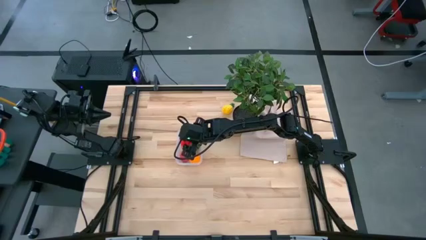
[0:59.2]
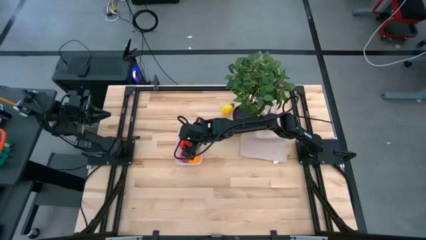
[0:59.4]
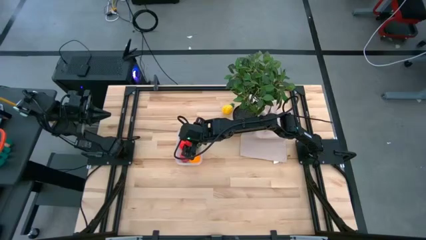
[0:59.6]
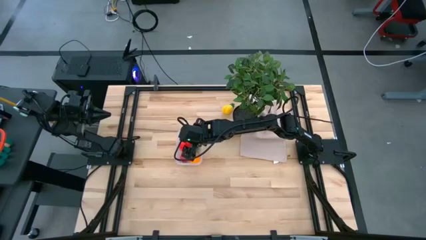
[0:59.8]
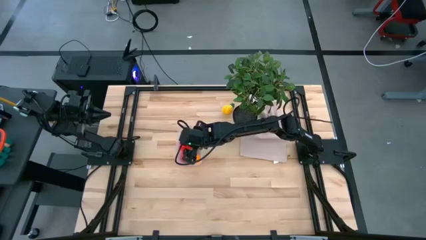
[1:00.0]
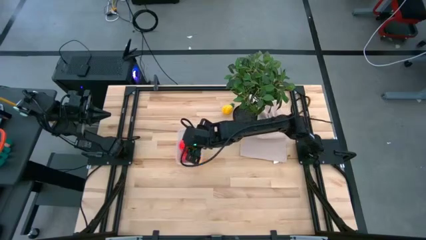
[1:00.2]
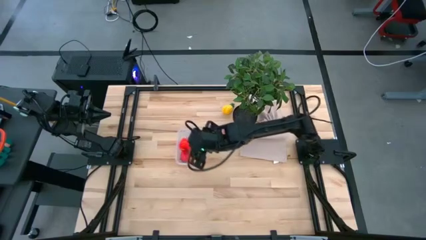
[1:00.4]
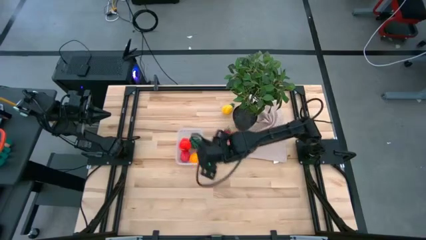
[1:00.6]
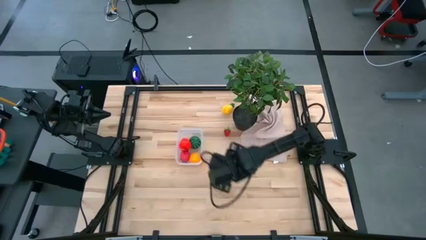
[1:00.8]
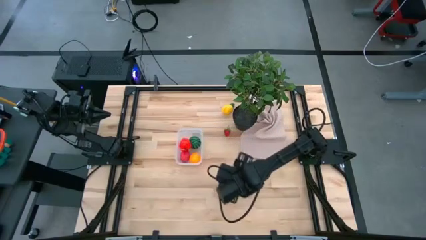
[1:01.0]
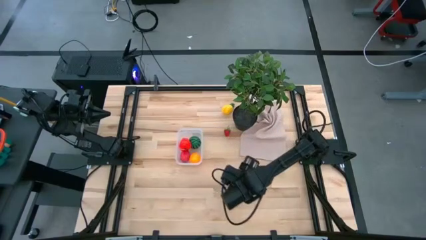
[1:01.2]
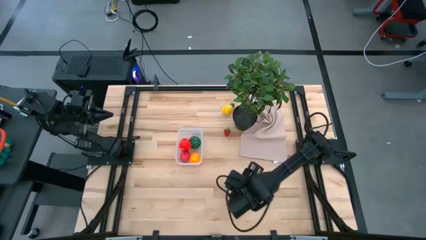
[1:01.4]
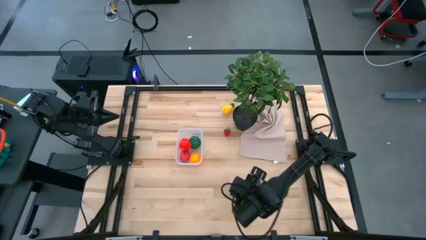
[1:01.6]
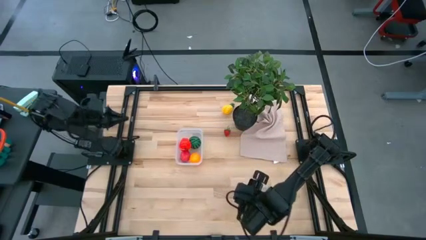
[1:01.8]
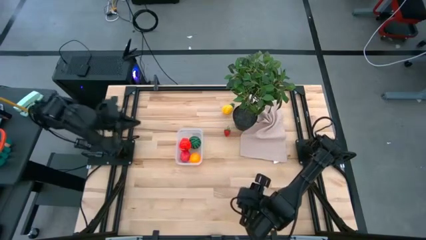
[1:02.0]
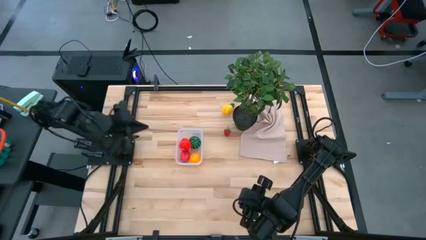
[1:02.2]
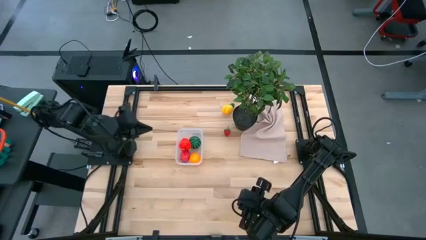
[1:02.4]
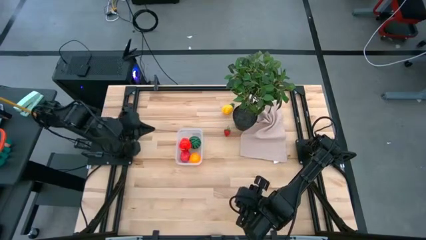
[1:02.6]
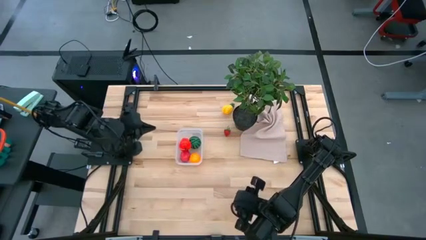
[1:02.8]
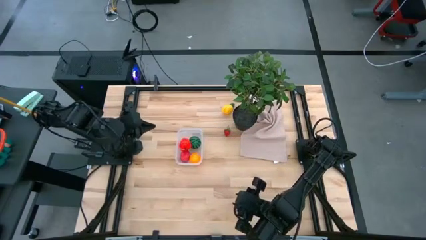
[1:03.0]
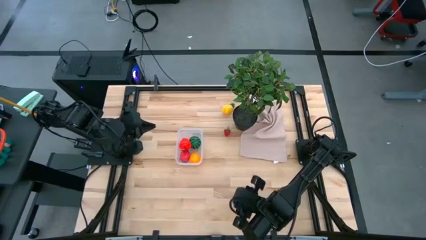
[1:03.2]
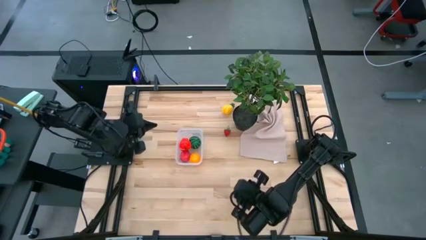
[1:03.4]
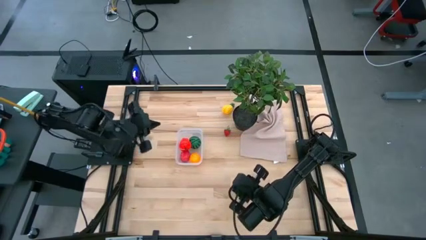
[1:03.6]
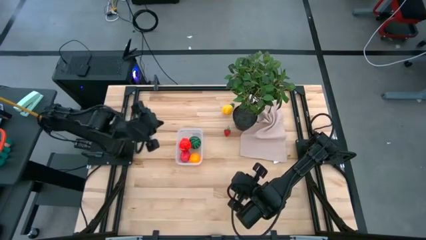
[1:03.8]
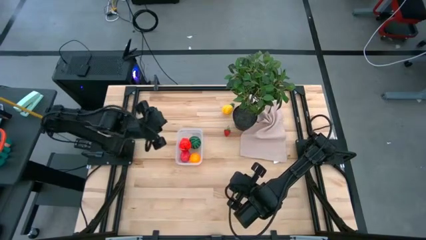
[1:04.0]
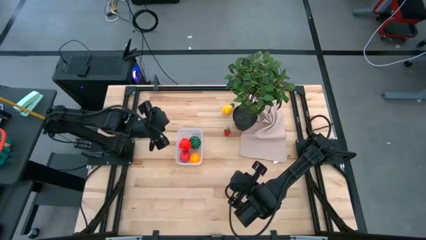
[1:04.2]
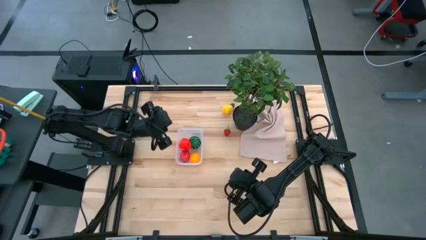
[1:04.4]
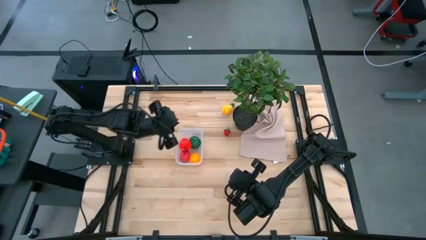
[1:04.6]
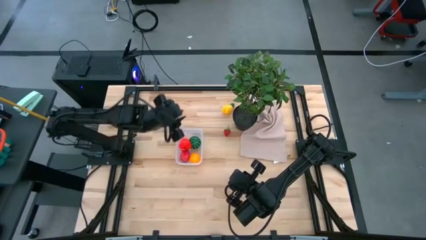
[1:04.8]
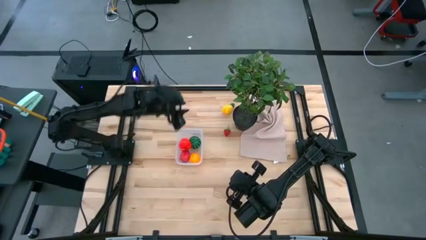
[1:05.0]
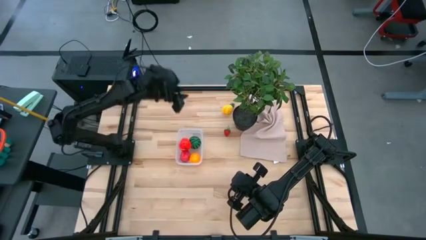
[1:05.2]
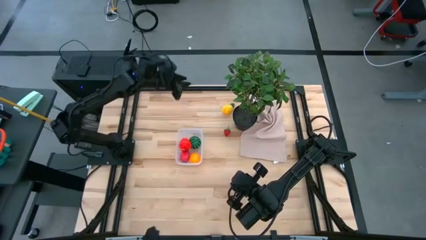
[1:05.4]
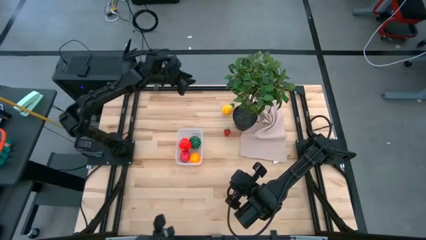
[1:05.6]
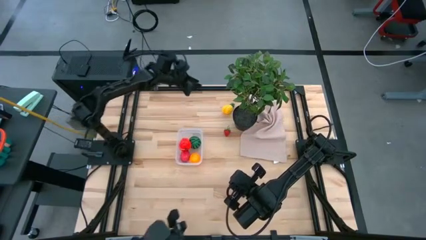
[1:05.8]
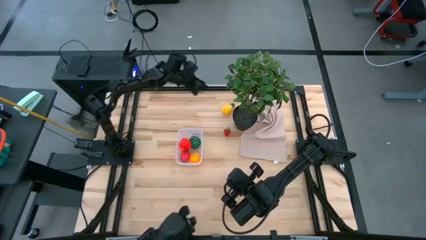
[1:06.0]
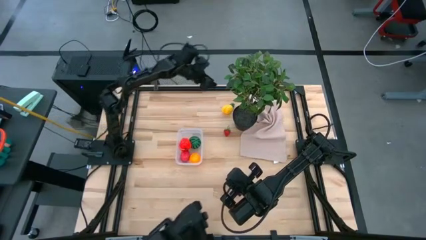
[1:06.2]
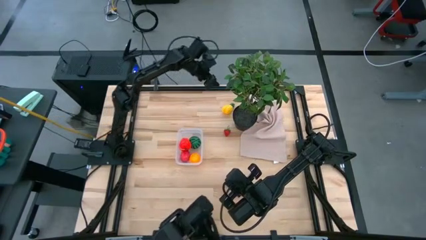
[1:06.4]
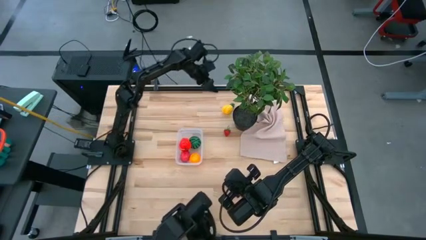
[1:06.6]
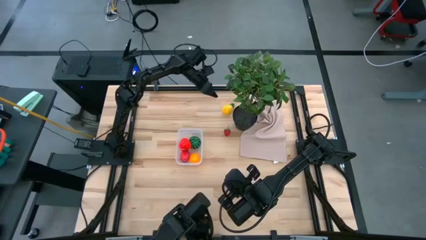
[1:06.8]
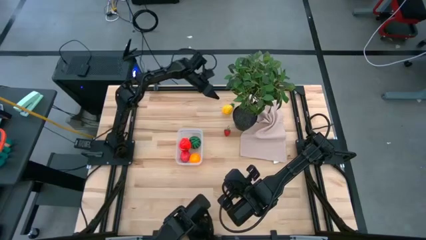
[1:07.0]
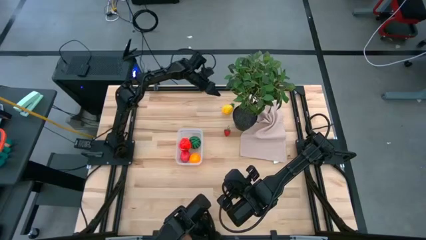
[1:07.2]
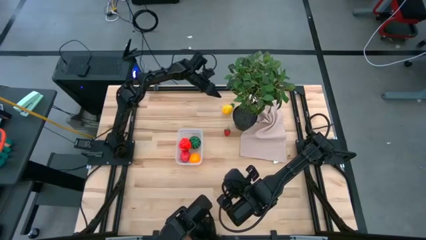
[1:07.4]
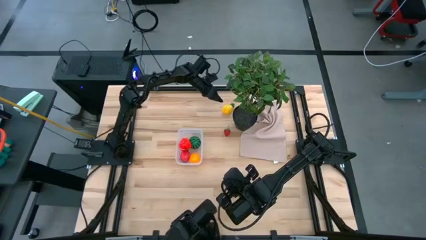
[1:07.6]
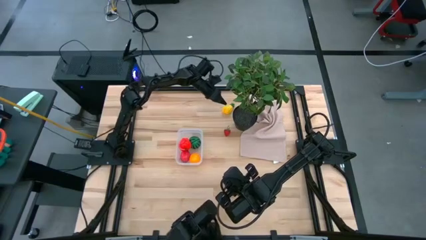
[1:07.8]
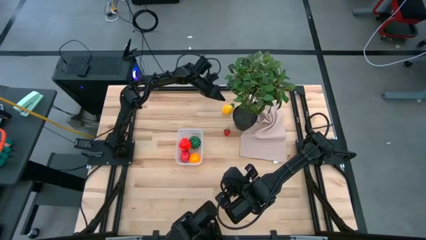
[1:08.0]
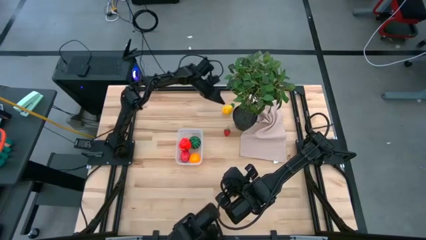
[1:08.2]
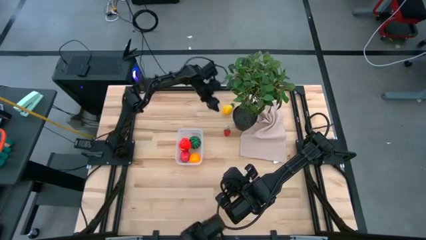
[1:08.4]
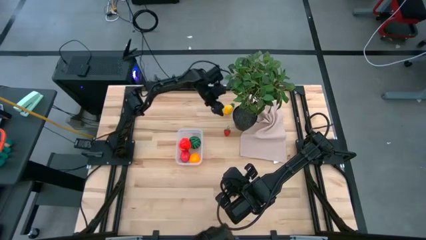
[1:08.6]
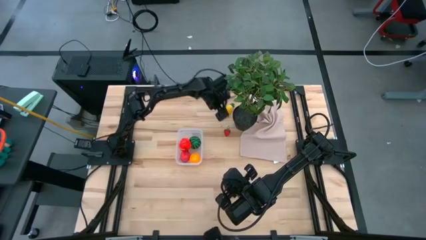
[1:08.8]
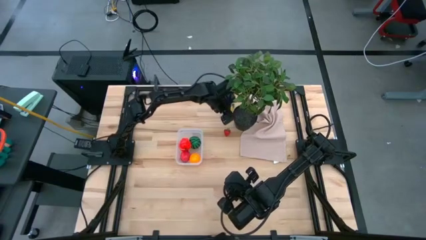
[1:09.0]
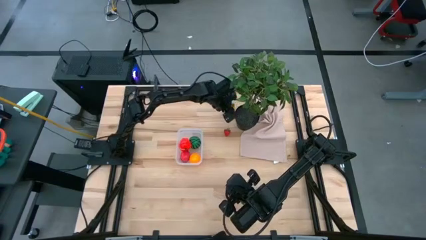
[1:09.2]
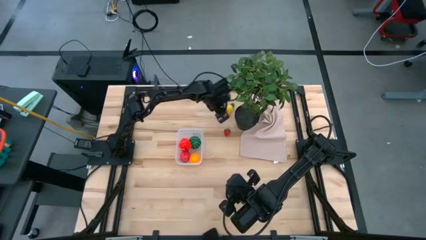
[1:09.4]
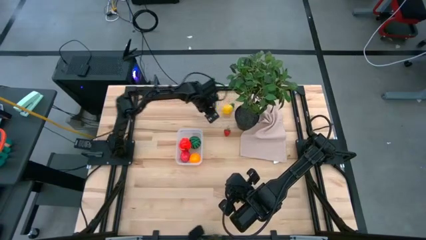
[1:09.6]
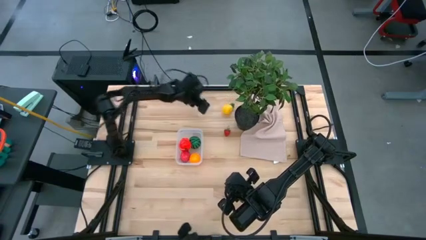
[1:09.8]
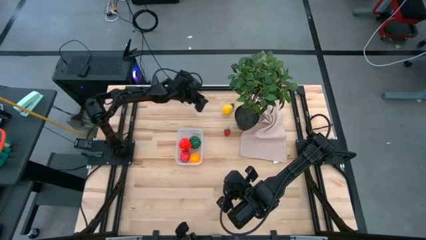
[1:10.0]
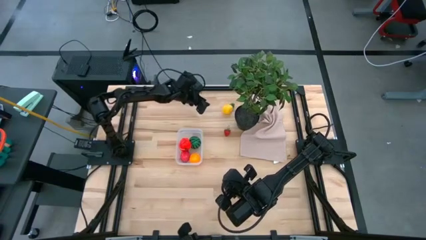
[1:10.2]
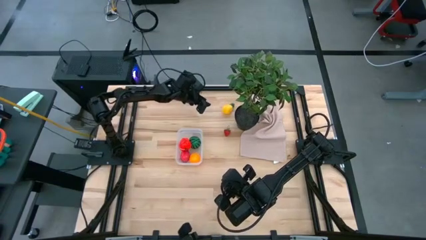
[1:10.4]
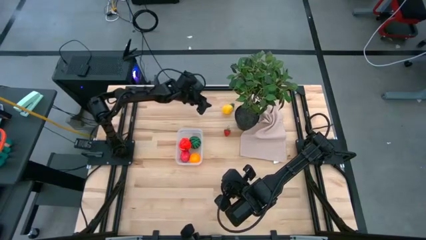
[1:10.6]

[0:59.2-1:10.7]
Task: Pick and placing Produce into tupperware
Adjust the flower pot

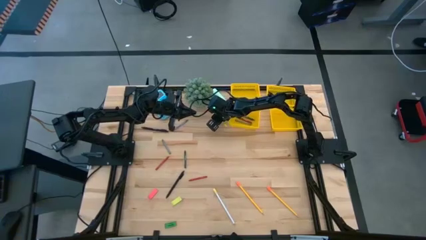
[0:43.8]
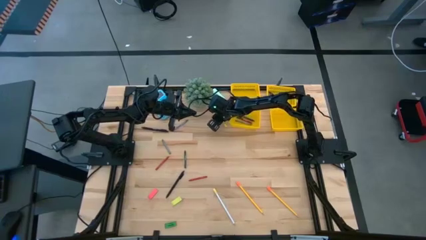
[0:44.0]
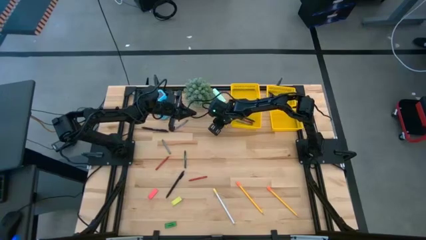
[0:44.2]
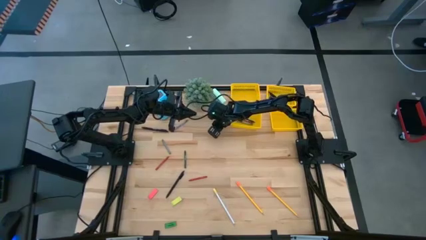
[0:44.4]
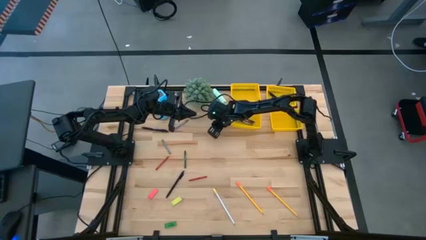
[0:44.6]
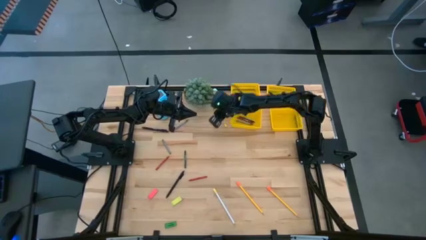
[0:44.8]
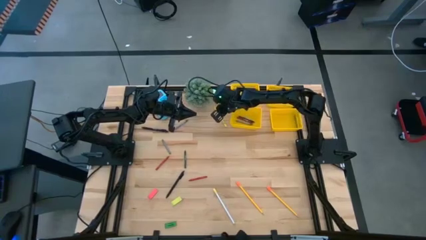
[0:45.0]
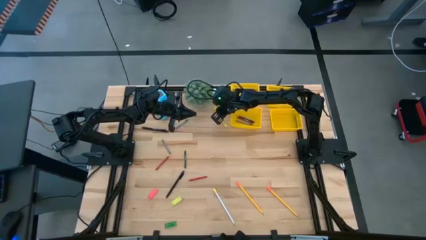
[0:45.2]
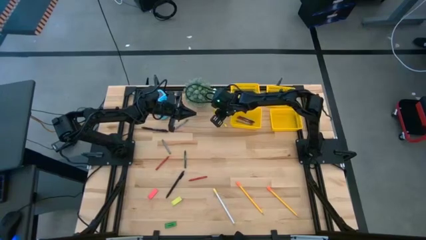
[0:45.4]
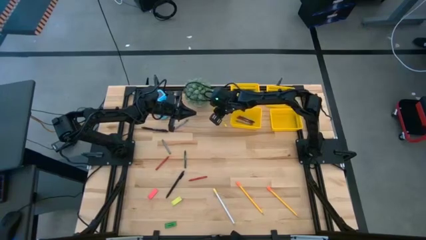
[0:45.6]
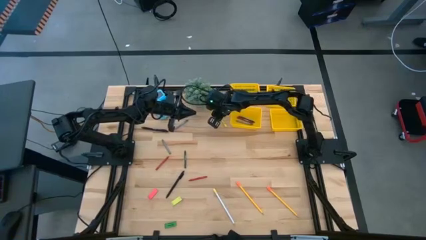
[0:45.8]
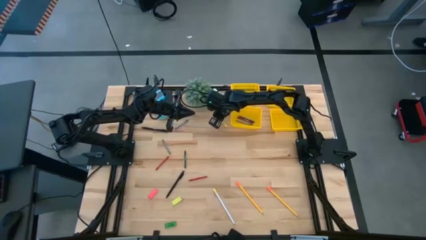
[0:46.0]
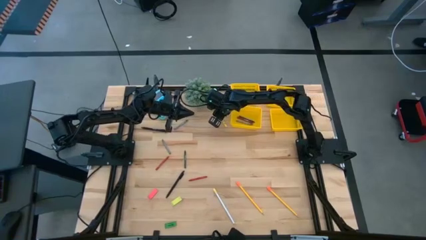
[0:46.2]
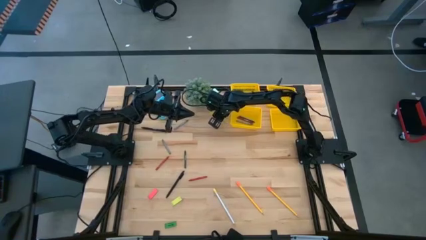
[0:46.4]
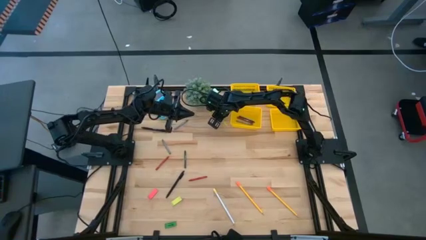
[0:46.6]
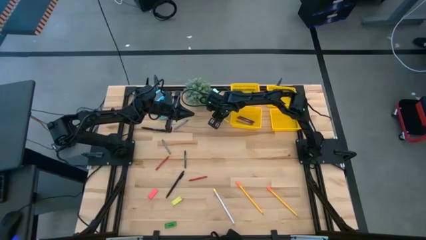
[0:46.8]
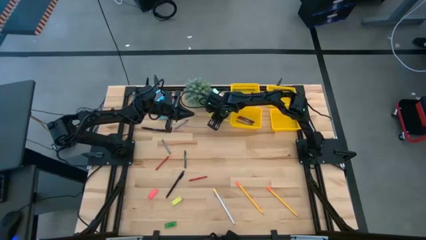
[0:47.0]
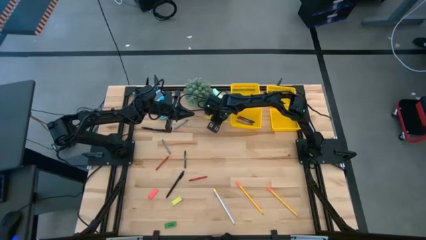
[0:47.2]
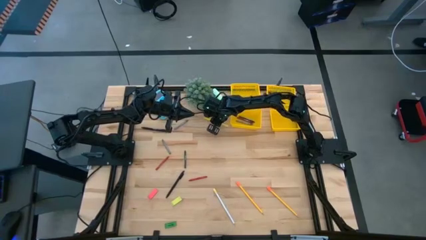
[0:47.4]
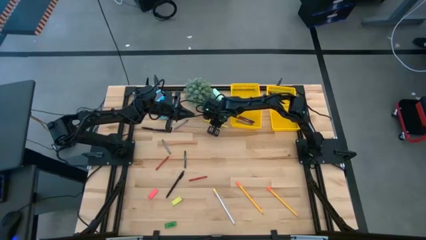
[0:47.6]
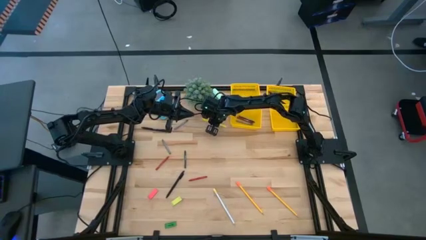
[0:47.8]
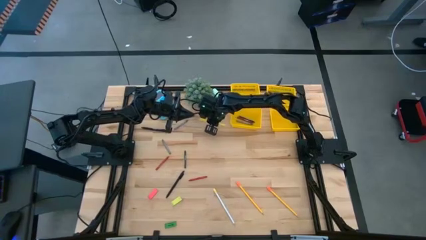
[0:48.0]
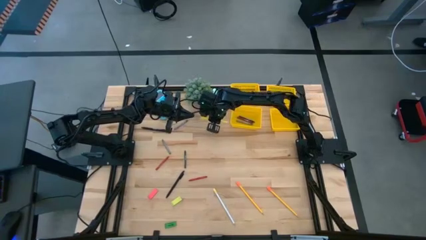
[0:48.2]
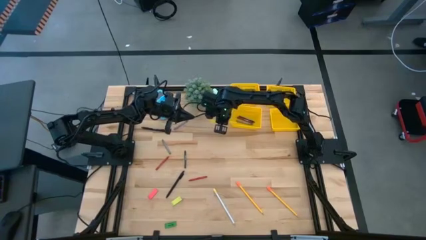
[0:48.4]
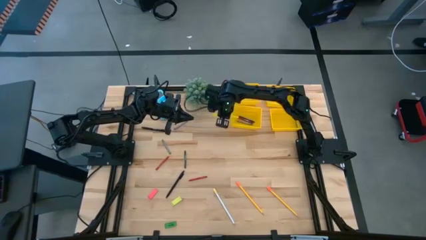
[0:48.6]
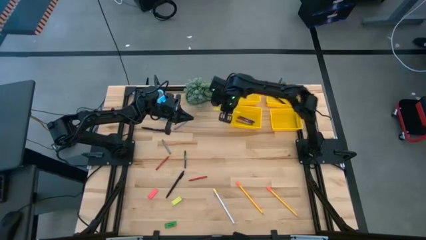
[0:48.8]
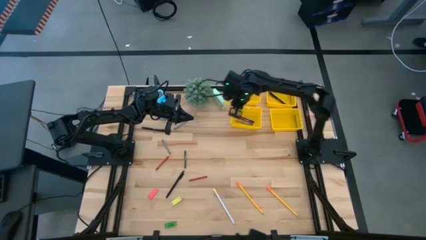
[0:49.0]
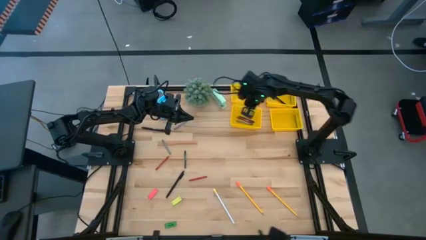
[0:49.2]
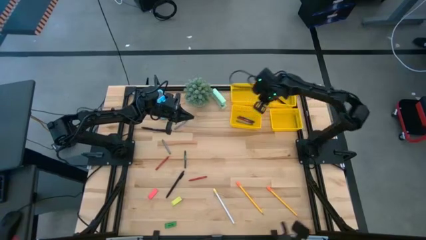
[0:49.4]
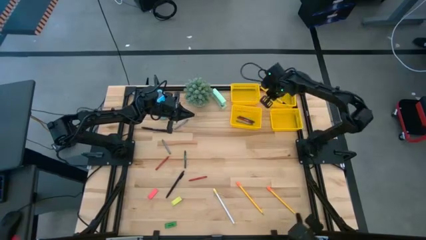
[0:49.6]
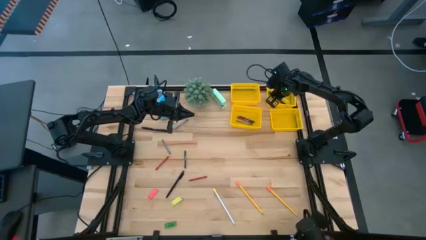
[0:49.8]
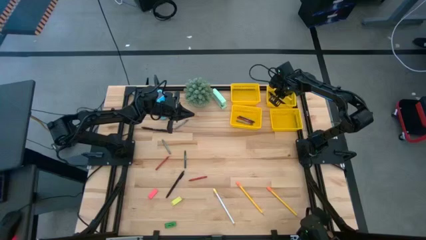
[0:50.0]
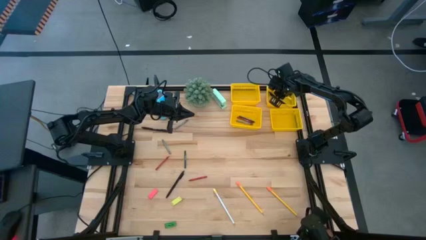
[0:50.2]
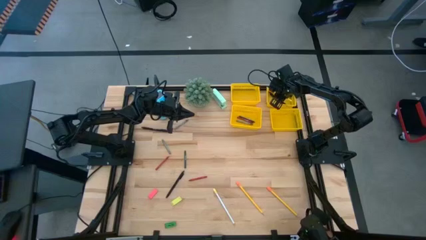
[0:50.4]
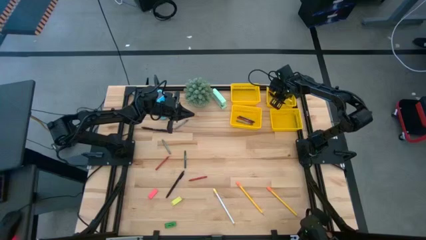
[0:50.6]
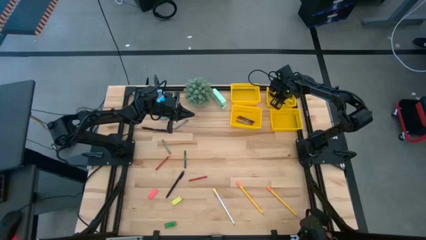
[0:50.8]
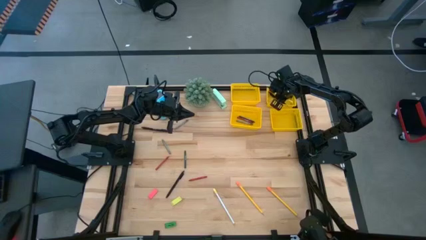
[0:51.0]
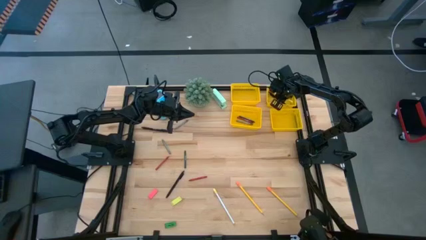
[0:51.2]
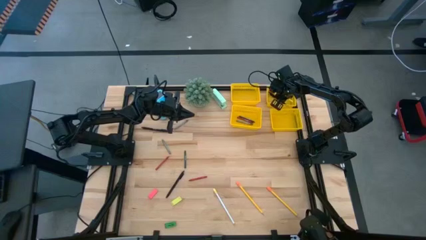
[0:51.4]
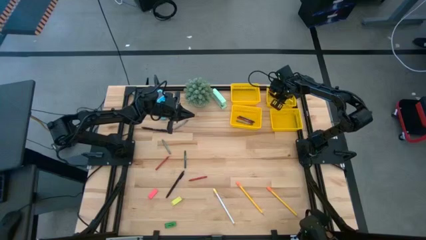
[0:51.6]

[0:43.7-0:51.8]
Task: Sort crayons/erasers/pens/pencils in bins
Put the yellow pen into the top right yellow bin
